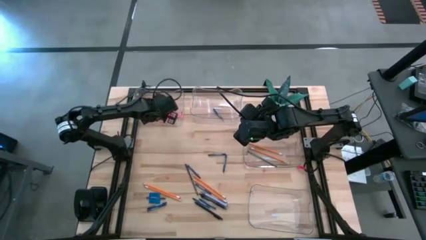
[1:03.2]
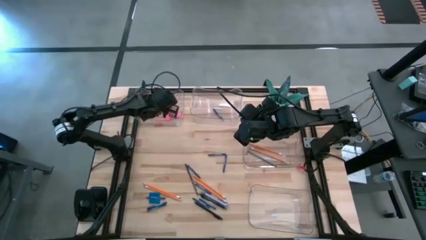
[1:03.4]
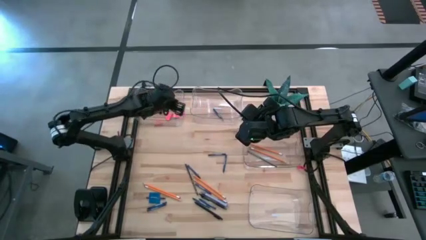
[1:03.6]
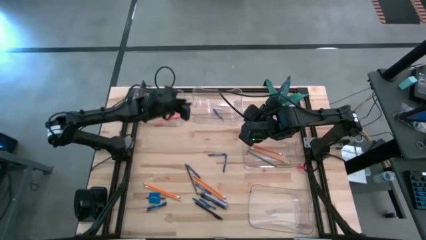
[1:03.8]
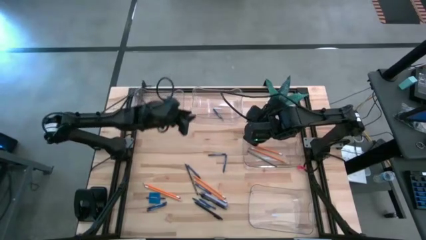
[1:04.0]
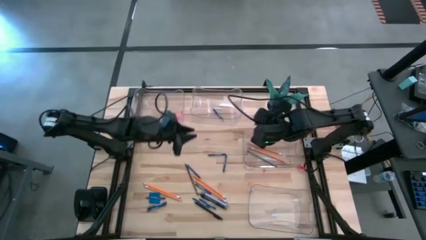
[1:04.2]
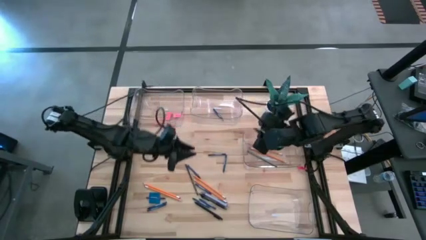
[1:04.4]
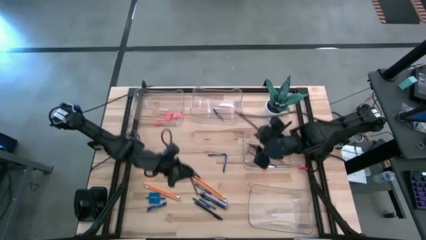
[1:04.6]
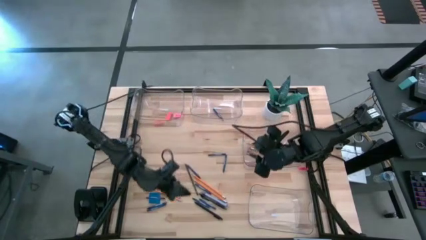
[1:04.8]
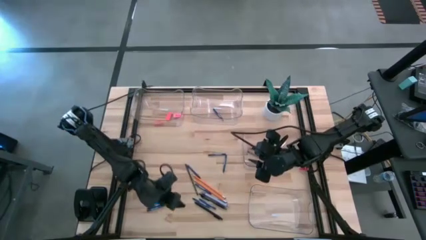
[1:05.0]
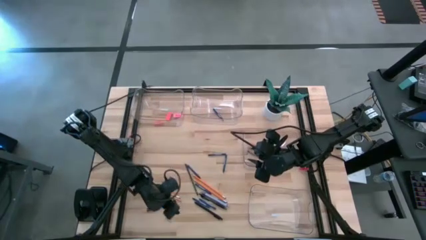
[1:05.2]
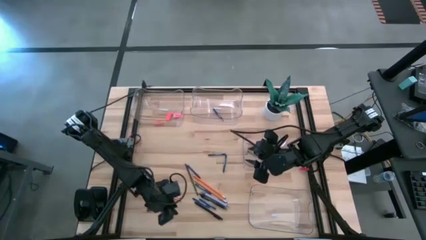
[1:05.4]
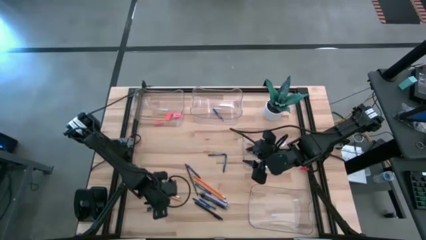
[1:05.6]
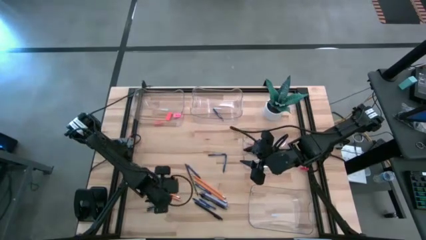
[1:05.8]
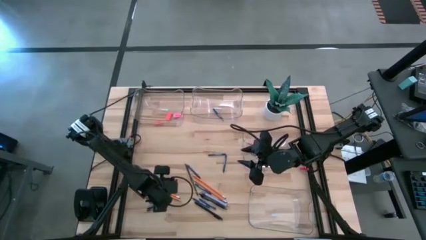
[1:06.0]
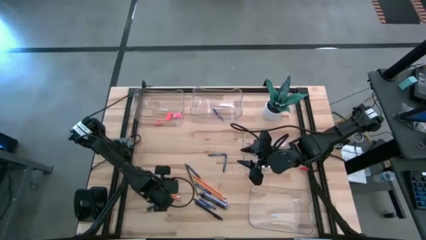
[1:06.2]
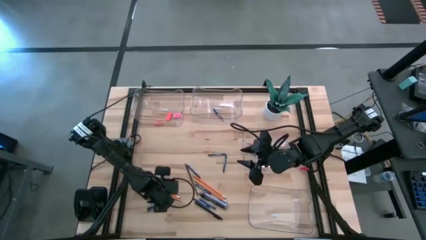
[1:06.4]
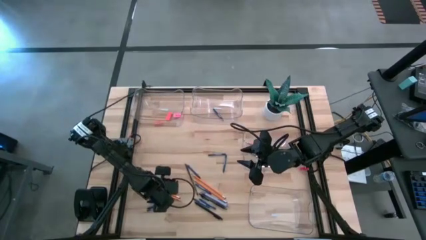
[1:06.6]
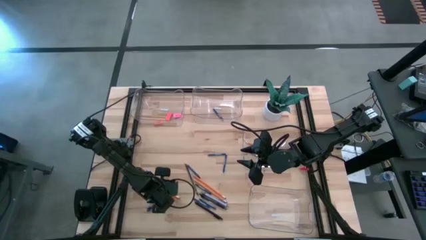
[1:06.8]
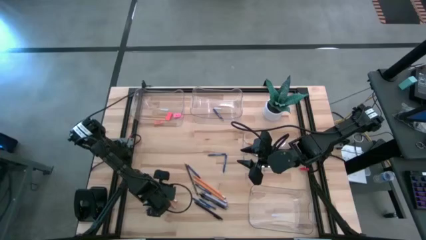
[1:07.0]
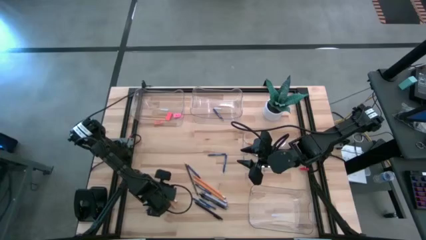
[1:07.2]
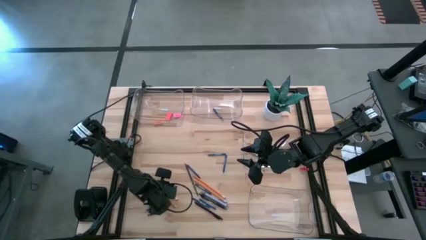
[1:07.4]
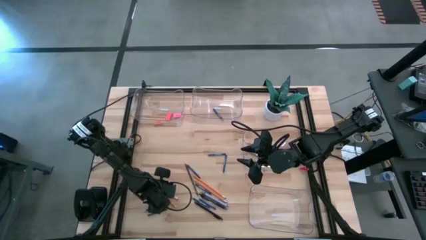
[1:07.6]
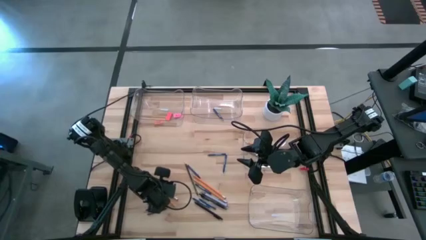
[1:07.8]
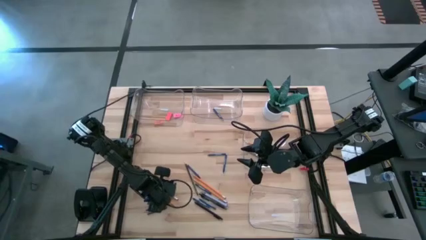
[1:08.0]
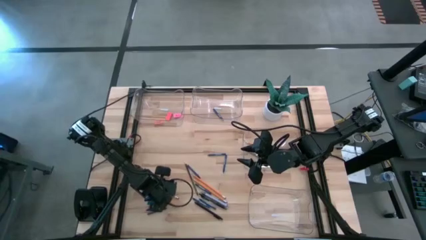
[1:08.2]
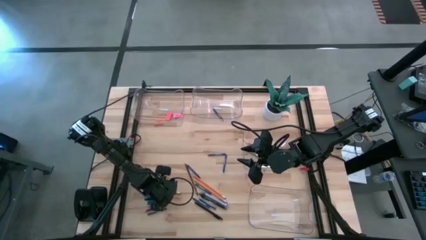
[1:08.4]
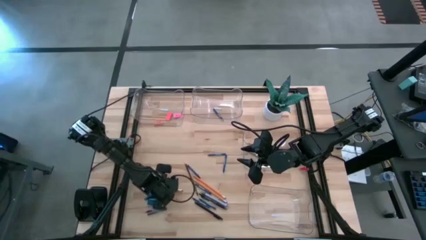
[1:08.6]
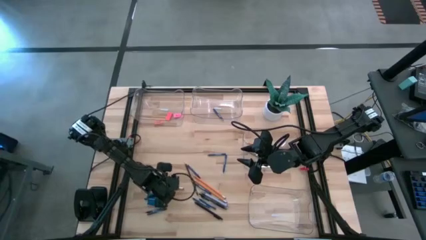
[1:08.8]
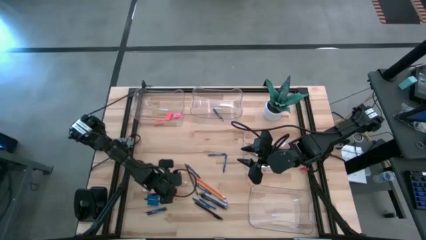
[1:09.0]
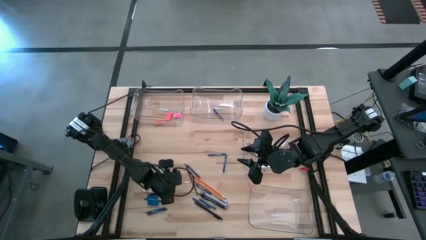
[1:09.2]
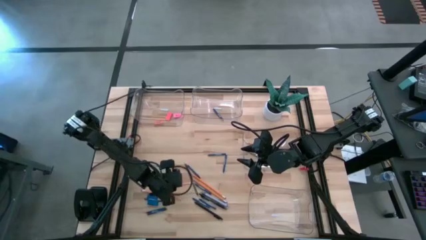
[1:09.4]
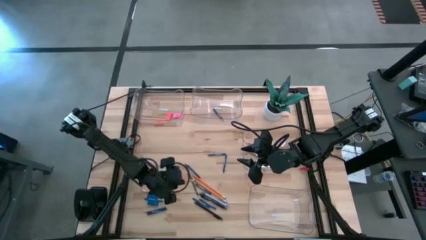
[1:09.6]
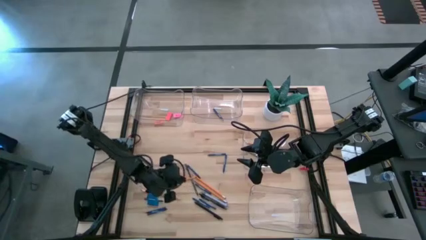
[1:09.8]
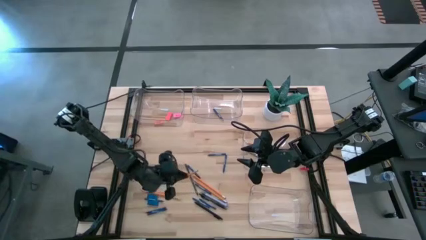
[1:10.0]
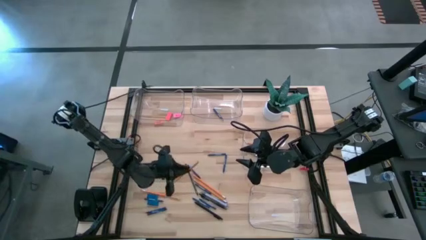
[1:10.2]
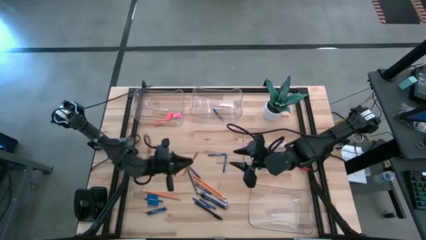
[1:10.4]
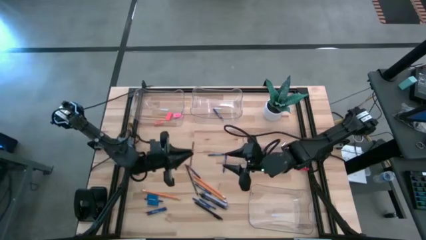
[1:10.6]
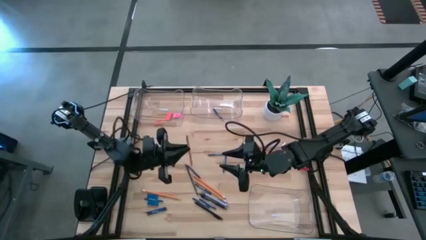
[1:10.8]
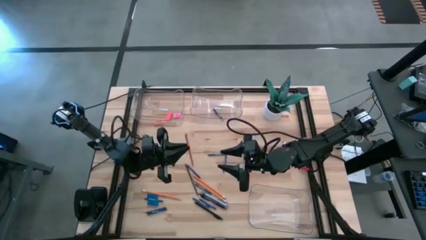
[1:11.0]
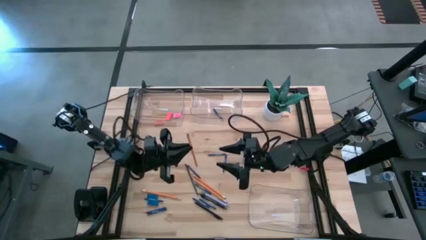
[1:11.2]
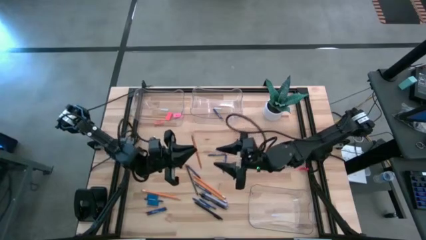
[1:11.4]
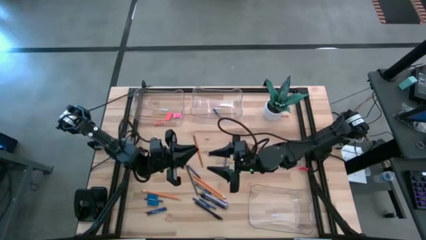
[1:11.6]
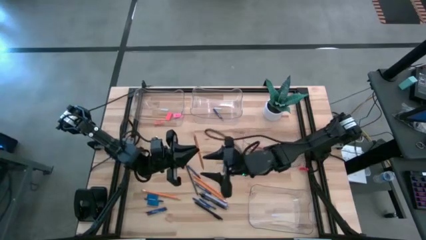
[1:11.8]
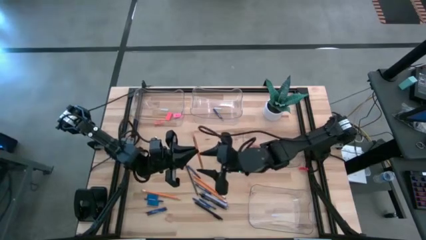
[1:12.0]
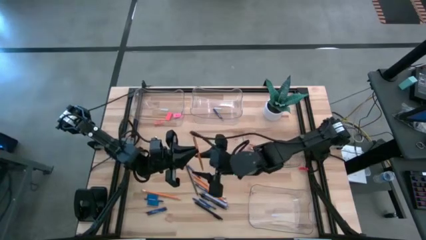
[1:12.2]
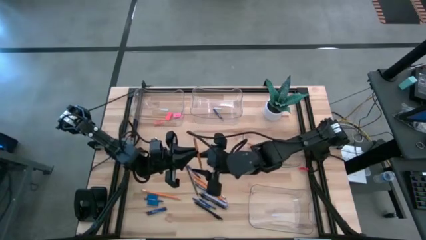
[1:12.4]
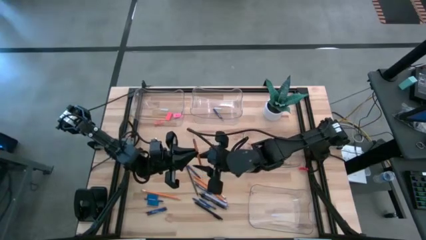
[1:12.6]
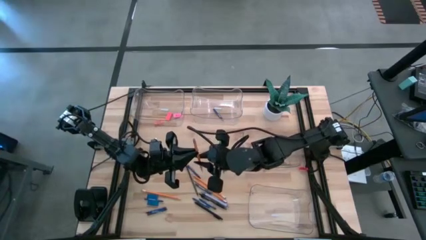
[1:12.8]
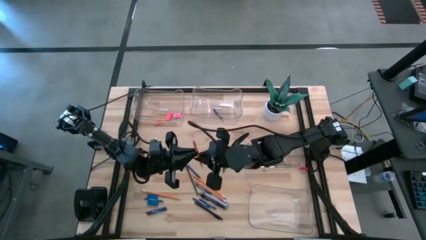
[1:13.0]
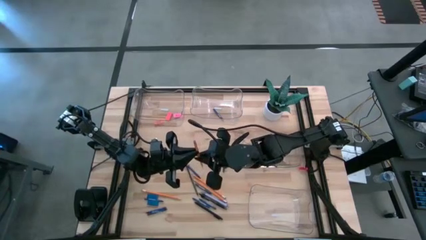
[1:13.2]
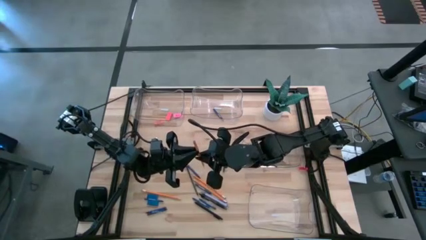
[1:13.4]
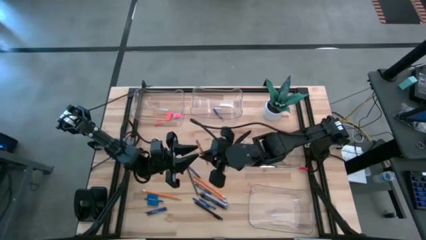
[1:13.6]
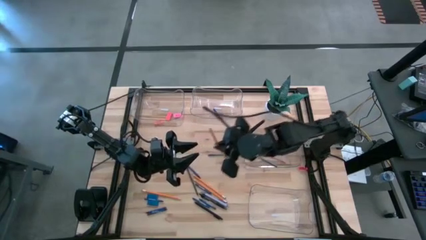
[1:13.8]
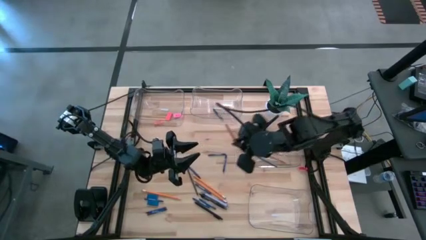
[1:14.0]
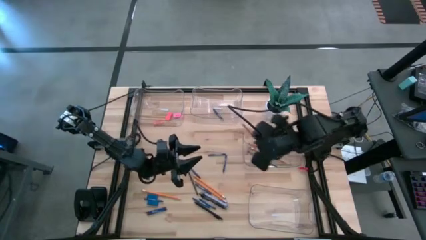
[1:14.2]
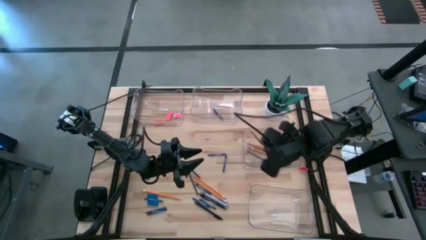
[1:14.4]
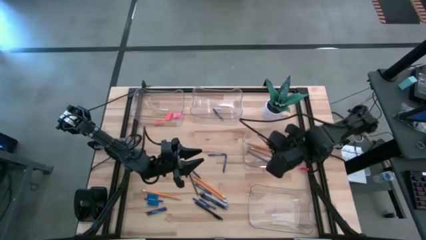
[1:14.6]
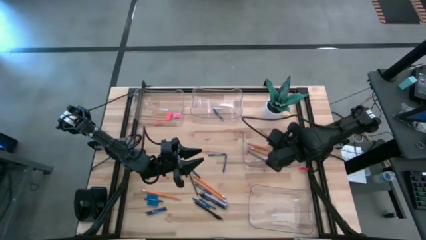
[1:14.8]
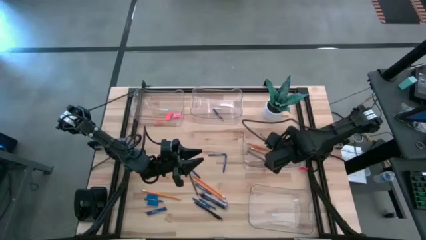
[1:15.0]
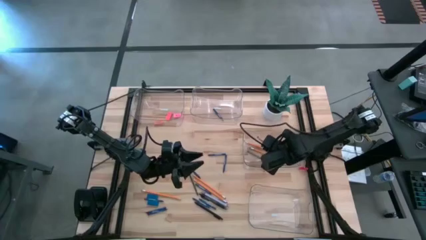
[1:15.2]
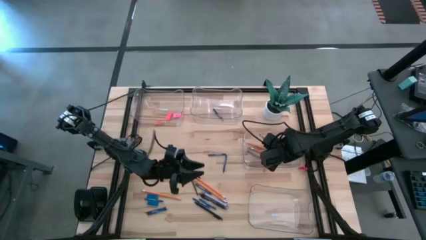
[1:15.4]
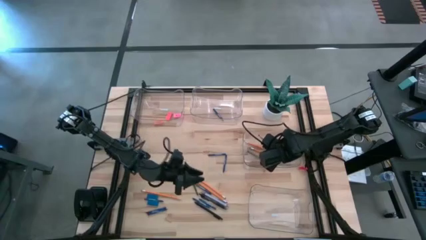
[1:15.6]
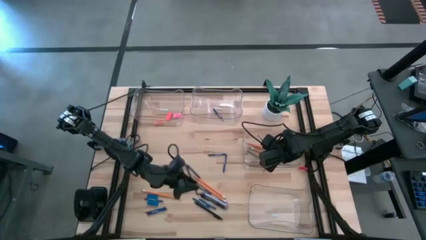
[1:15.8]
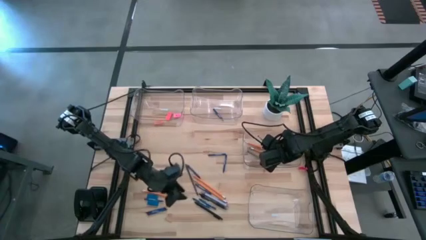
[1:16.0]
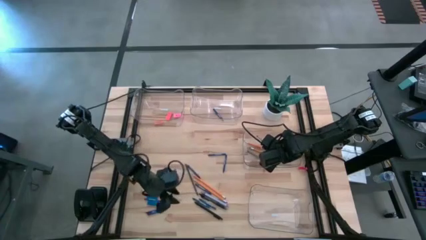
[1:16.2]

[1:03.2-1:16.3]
Task: Sort crayons/erasers/pens/pencils in bins
Put the orange pencil into the middle transparent bin
